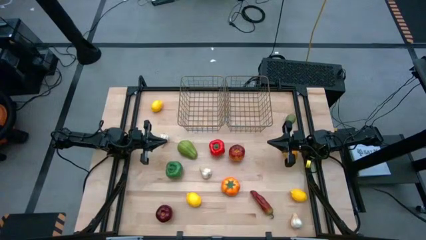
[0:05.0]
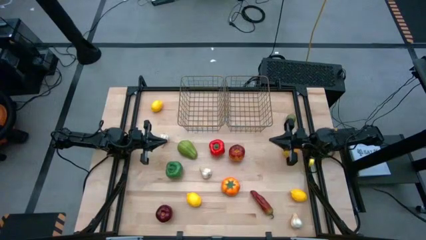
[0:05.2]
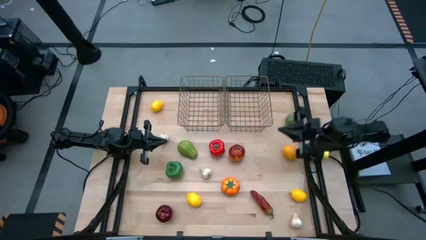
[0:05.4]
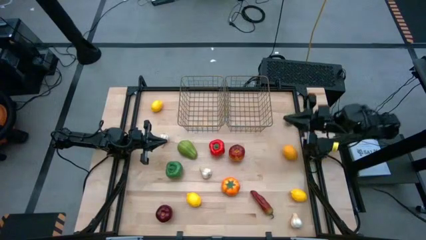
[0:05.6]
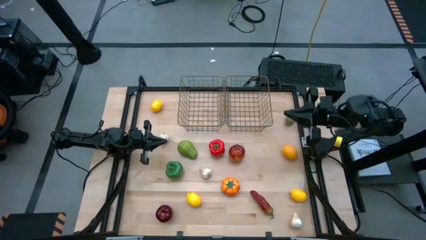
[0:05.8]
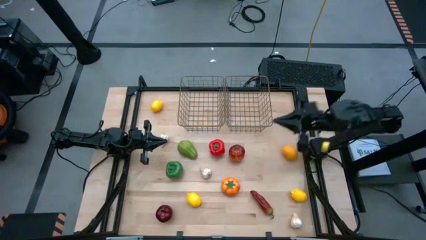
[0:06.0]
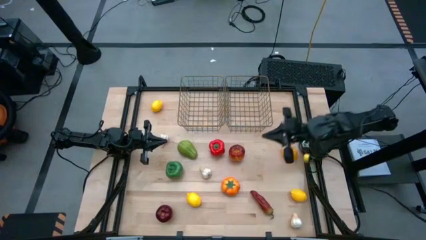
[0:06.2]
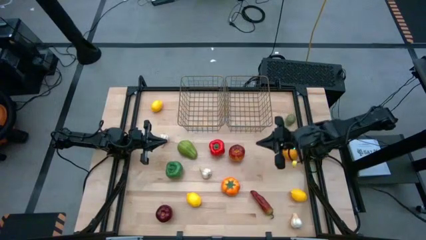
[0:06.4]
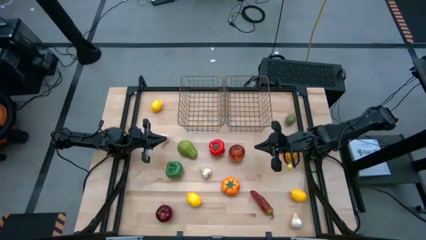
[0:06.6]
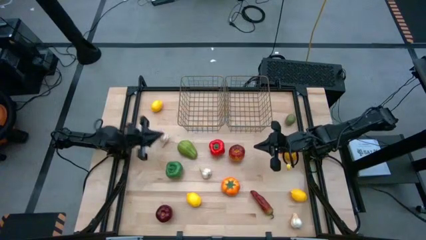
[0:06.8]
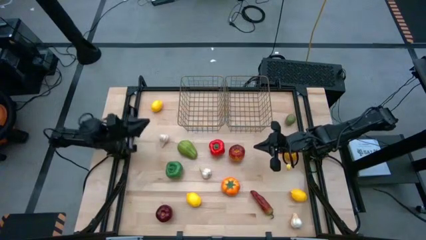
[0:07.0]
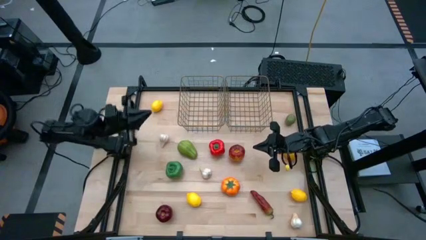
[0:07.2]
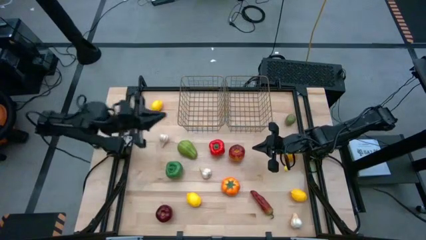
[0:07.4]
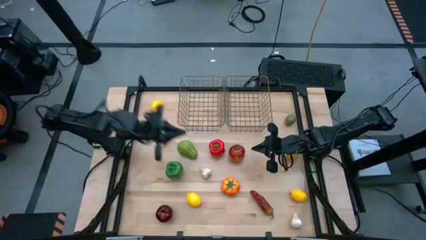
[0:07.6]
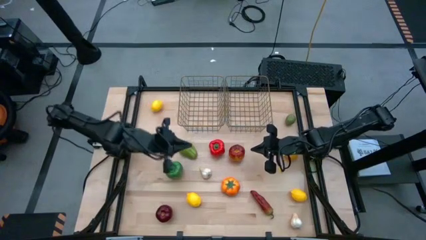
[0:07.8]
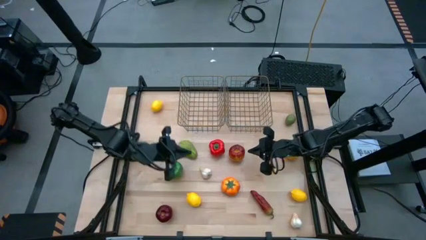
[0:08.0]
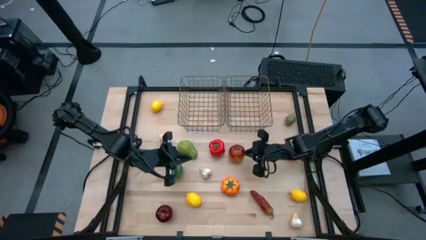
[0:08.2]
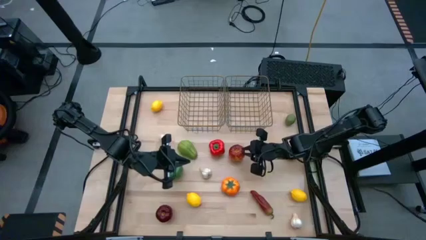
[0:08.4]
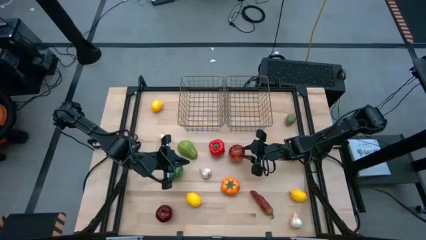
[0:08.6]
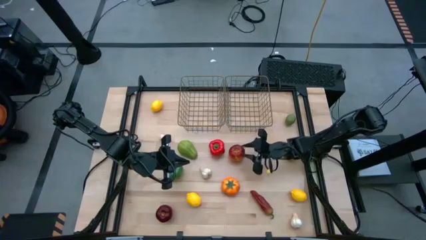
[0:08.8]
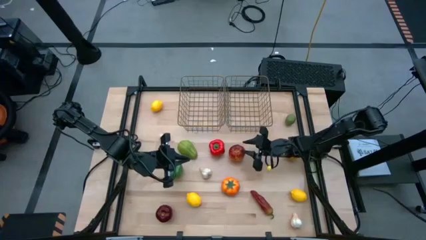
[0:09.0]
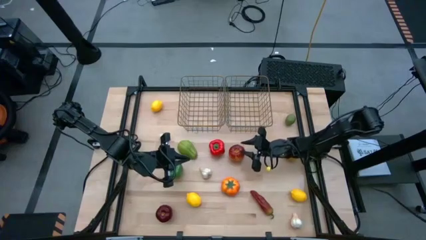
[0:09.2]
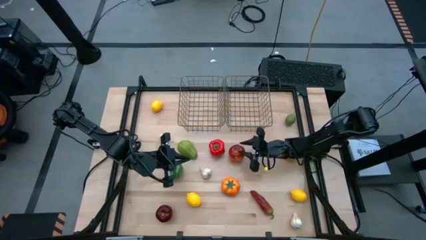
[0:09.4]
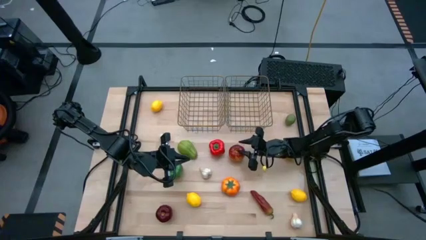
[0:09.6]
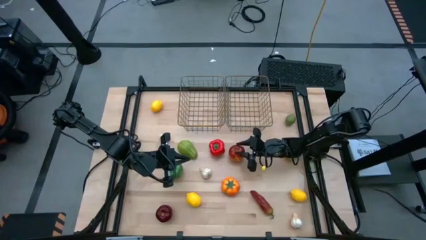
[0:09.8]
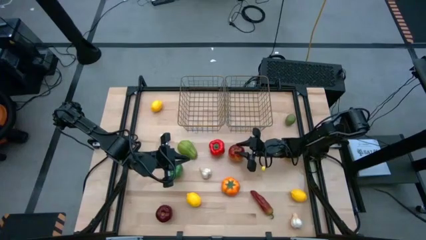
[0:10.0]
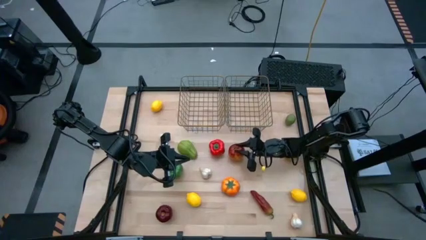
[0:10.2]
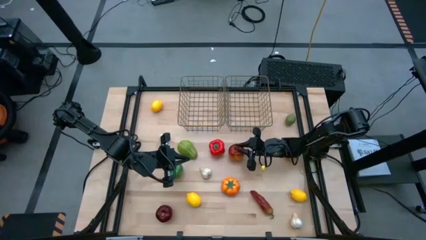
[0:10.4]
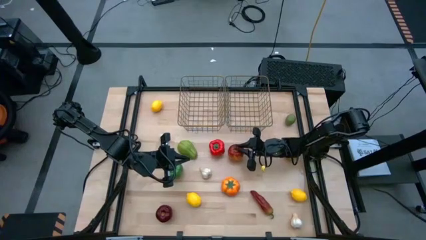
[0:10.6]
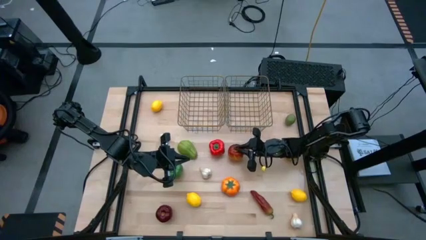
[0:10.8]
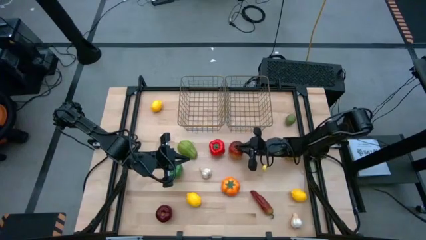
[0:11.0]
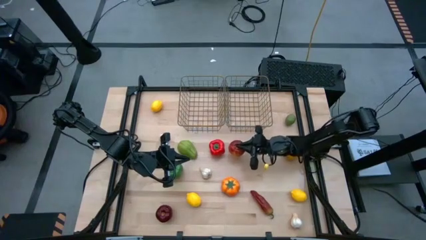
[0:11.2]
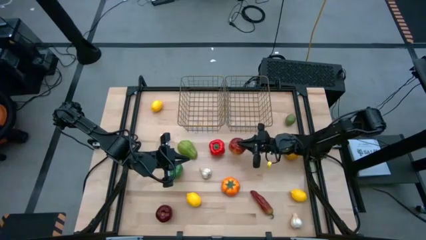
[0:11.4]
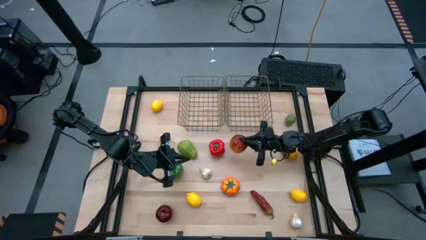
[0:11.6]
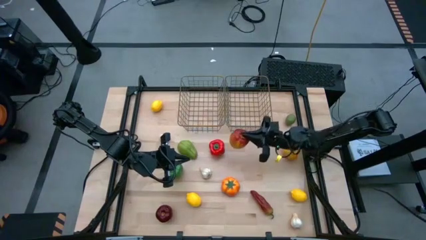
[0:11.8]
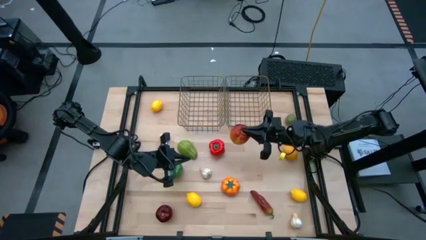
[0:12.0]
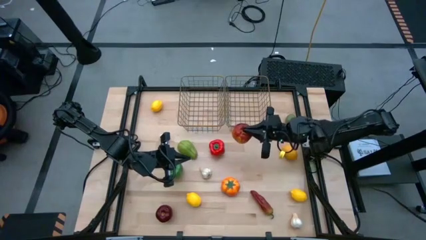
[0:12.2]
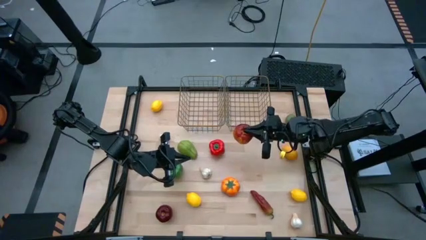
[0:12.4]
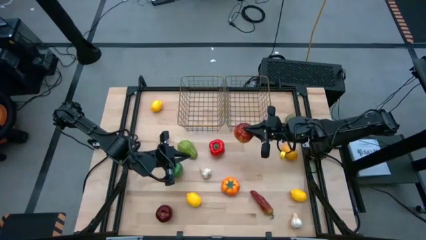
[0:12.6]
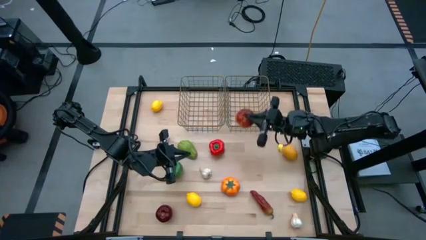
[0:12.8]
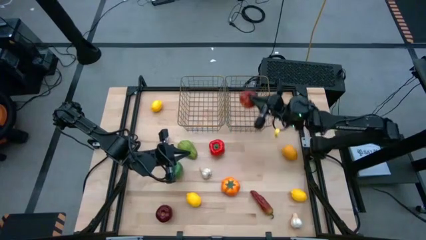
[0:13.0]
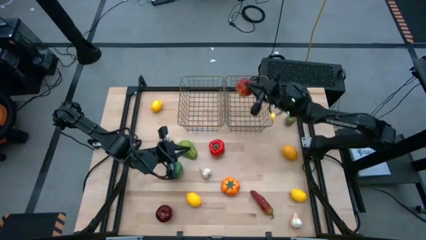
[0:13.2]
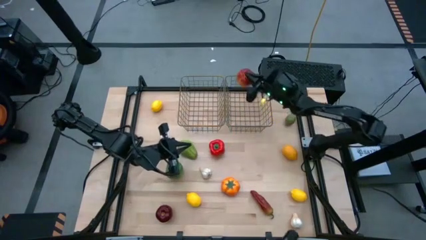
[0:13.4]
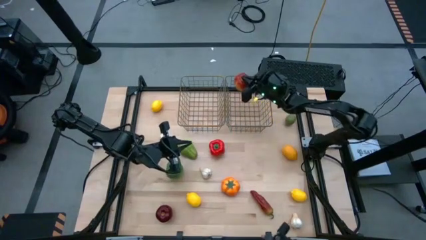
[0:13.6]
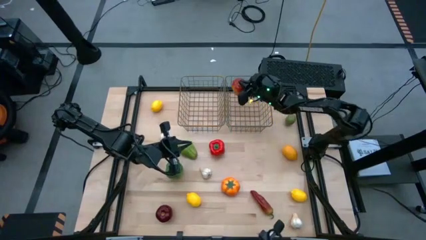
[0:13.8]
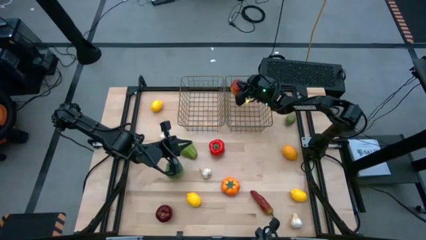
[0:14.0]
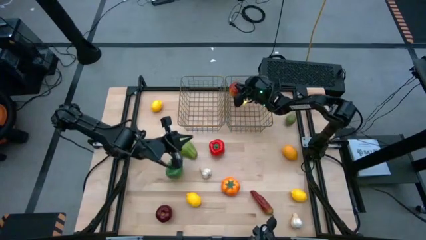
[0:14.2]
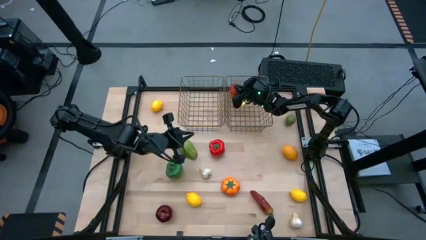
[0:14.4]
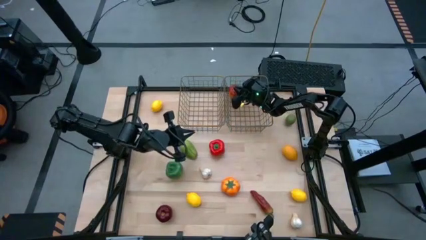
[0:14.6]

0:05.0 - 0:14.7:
Task: Sort produce into baskets
Put the top apple into the right mesh basket

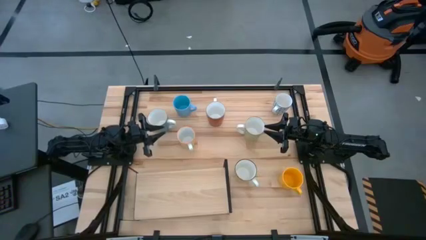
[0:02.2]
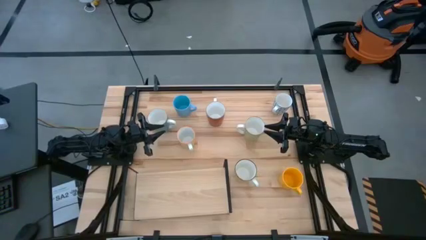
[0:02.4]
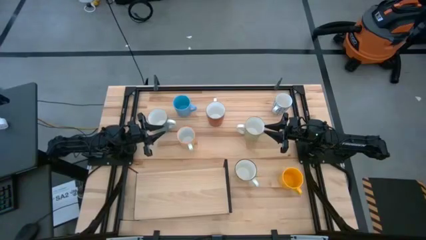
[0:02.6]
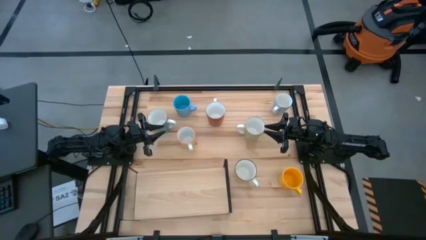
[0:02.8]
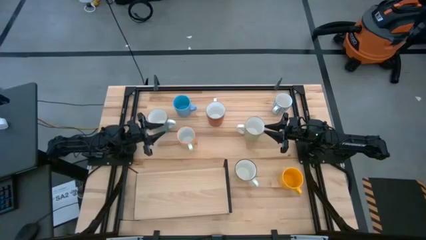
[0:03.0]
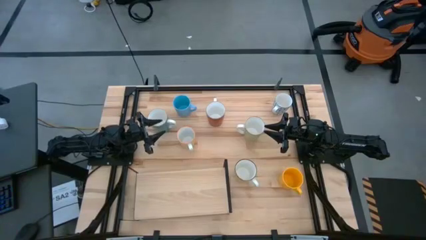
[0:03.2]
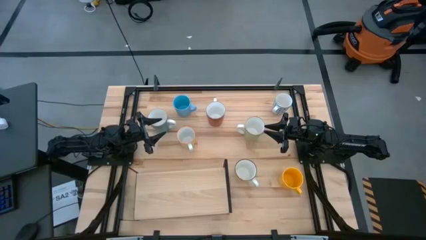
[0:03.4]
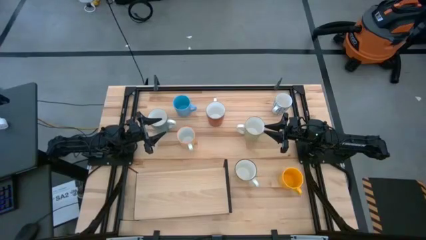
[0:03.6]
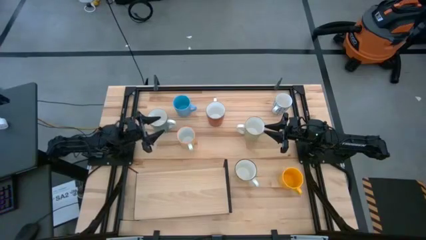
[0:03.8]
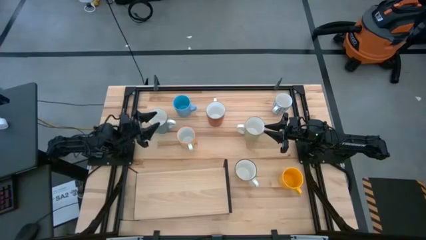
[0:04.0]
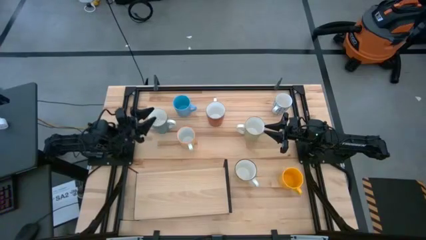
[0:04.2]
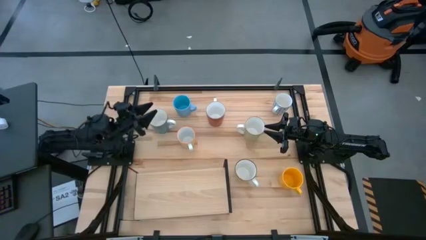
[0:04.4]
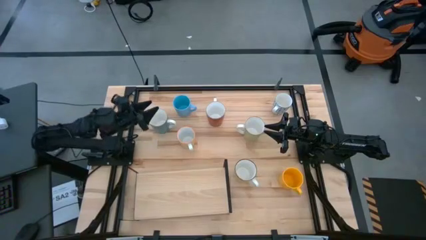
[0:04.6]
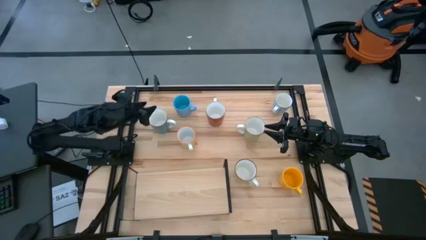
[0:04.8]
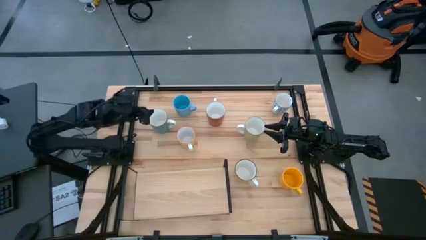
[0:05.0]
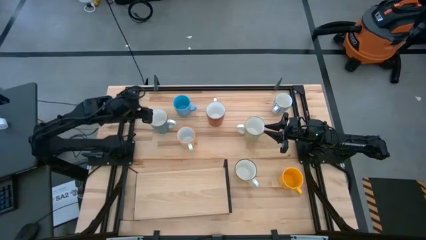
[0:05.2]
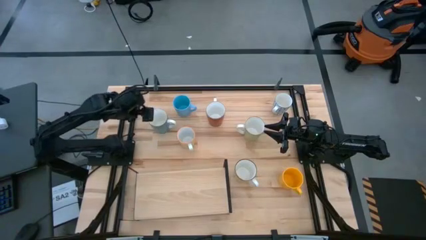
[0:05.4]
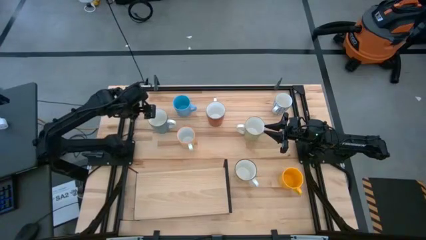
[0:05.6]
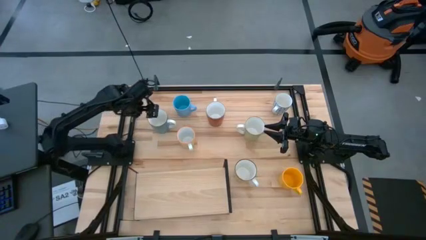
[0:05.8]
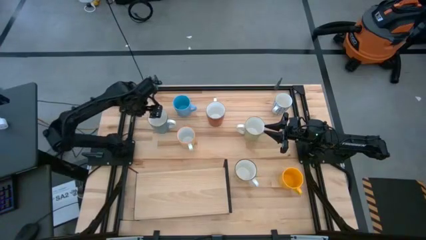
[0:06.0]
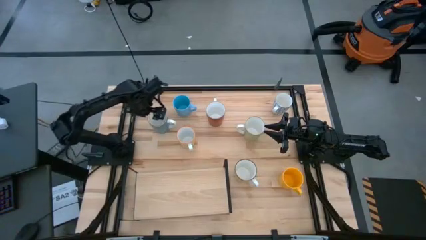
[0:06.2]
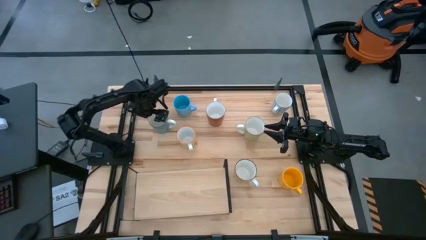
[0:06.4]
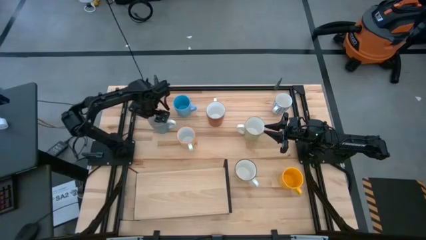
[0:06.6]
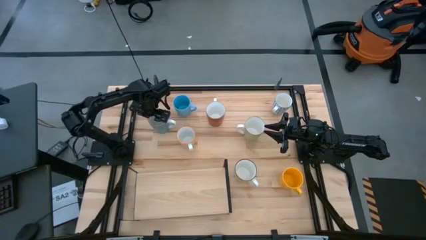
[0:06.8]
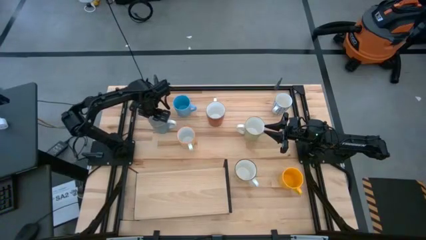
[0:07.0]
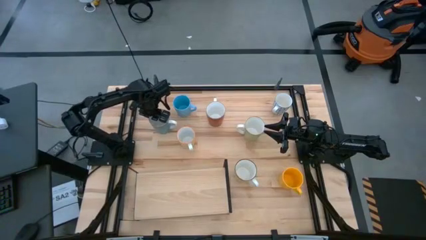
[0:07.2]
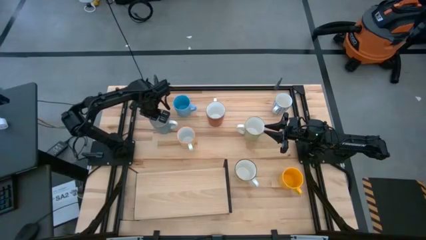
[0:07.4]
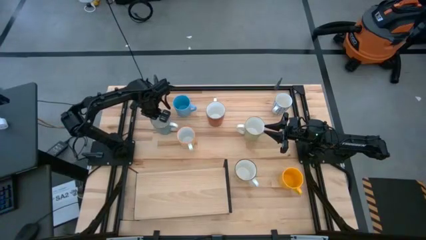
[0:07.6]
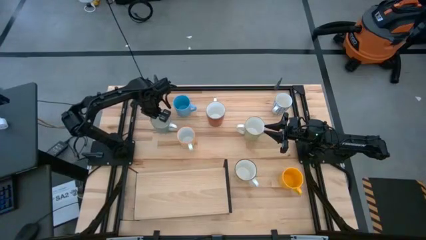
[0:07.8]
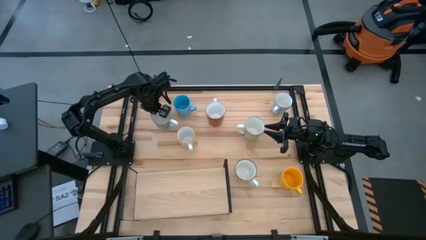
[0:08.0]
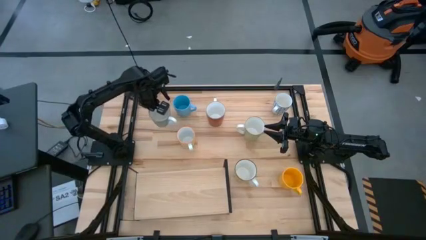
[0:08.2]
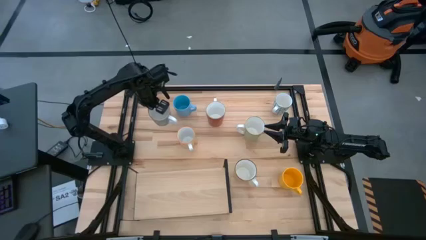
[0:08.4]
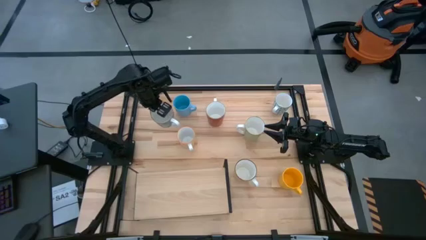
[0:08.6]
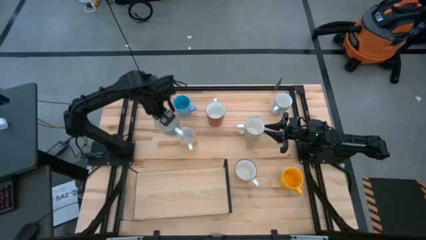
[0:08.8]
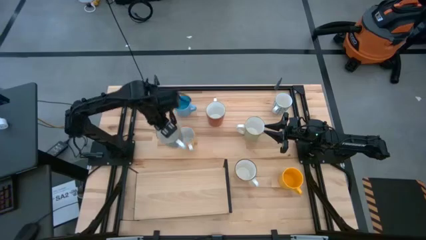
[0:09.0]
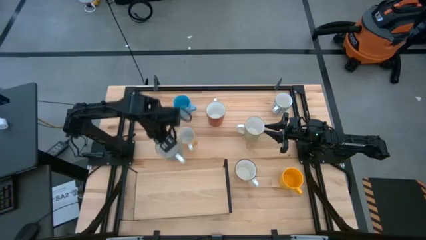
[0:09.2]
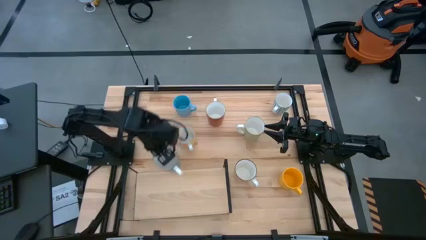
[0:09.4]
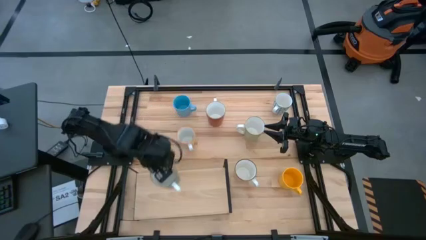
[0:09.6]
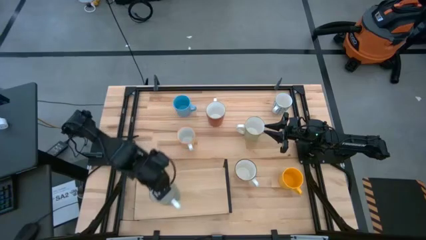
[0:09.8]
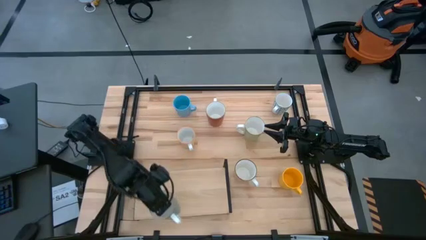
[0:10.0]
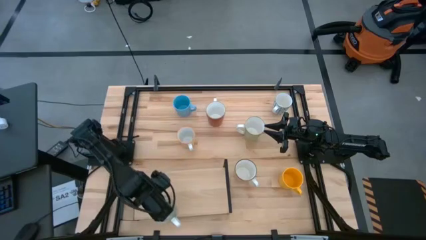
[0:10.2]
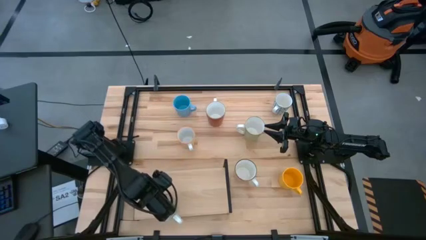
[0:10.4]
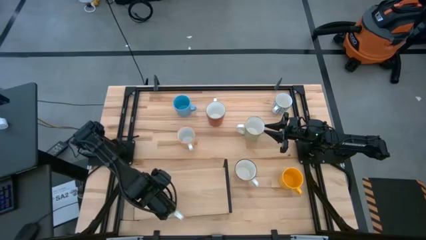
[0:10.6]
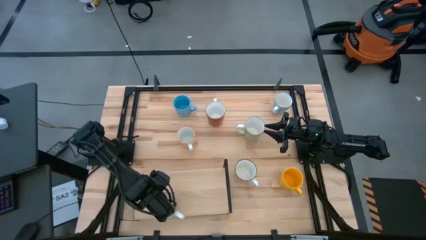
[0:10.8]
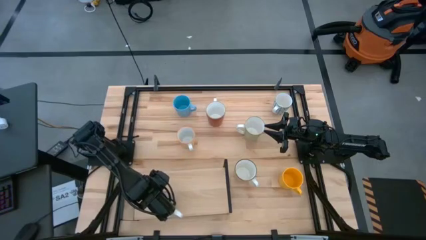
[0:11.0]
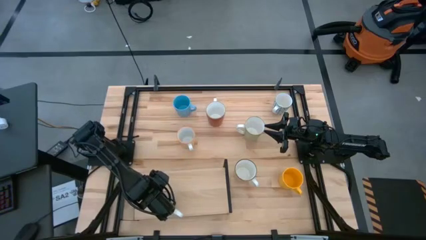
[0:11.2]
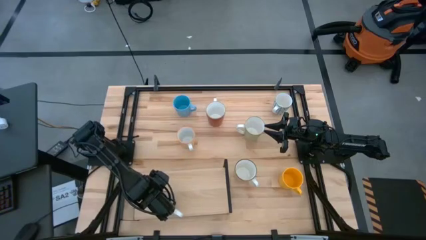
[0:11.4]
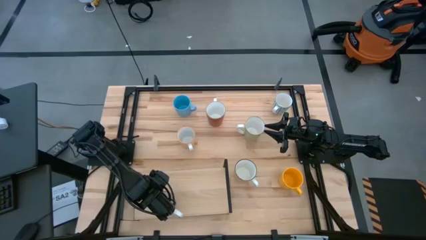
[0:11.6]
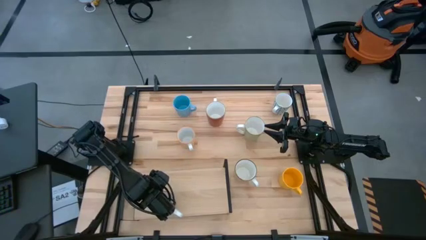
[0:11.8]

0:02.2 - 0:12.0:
Task: Place coffee mugs
Put the light blue mug on the shelf
